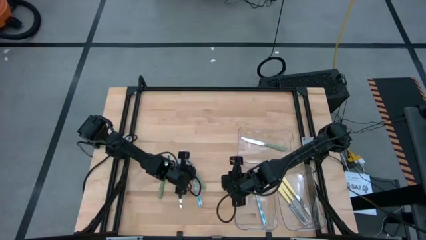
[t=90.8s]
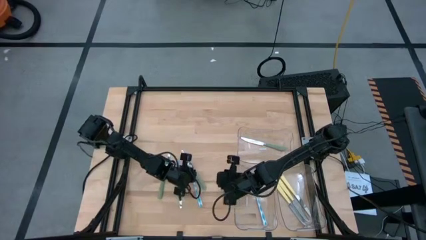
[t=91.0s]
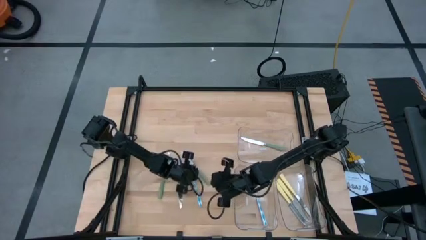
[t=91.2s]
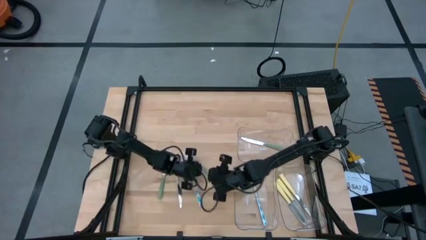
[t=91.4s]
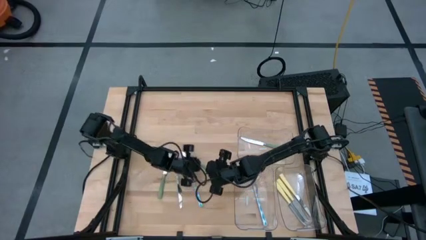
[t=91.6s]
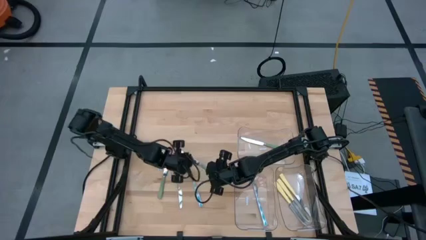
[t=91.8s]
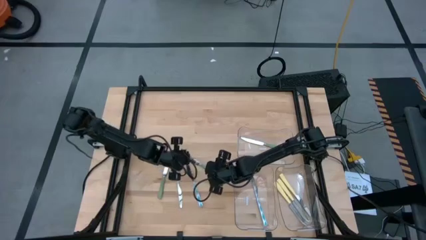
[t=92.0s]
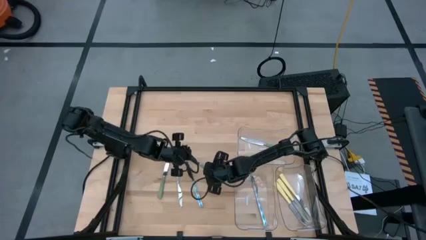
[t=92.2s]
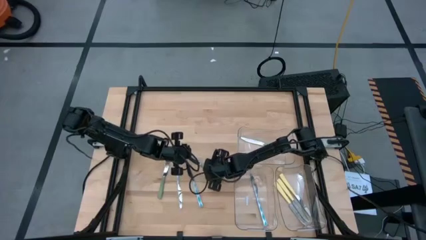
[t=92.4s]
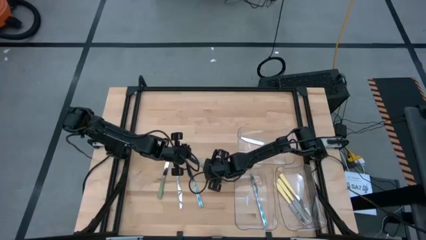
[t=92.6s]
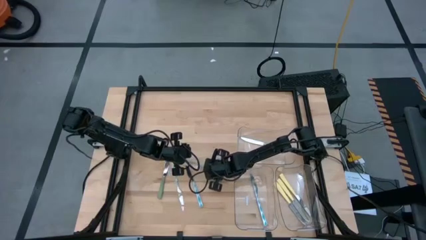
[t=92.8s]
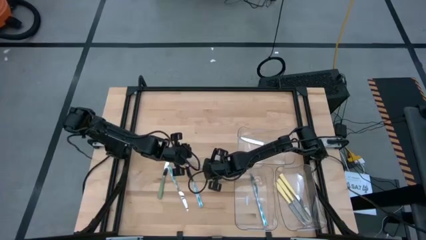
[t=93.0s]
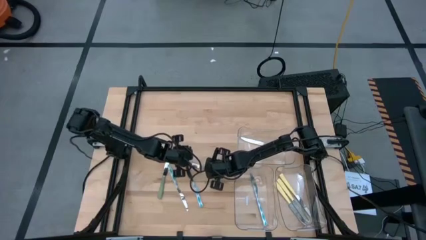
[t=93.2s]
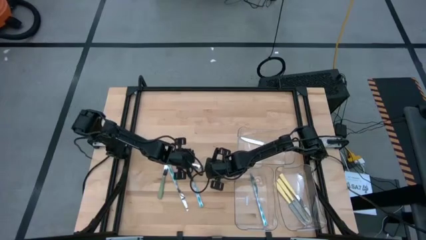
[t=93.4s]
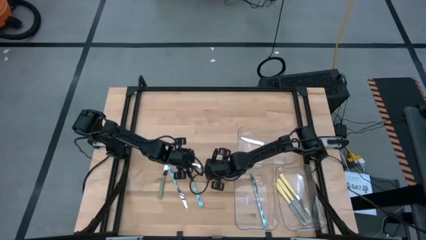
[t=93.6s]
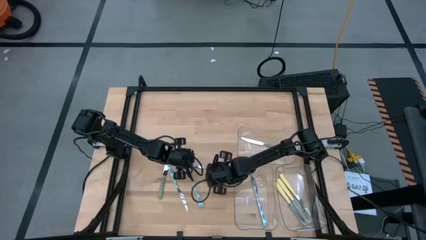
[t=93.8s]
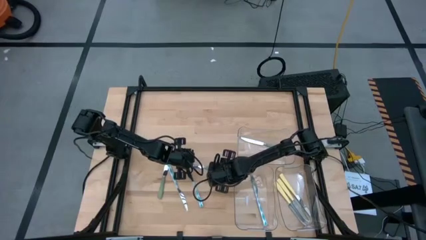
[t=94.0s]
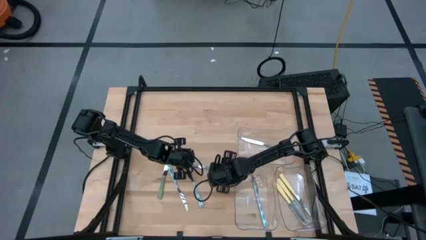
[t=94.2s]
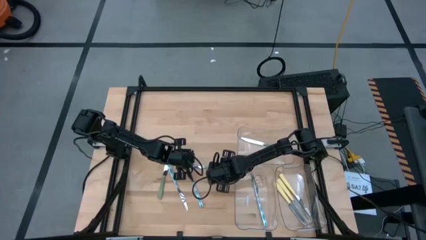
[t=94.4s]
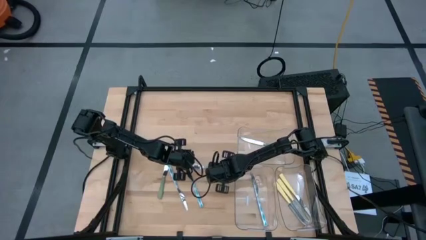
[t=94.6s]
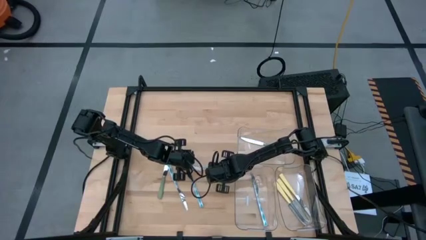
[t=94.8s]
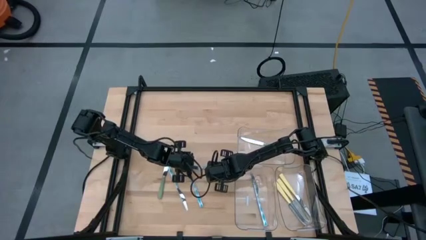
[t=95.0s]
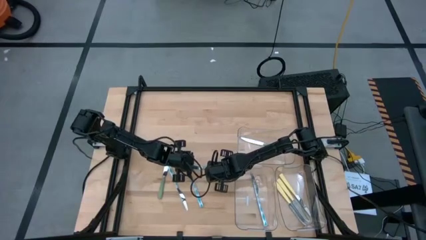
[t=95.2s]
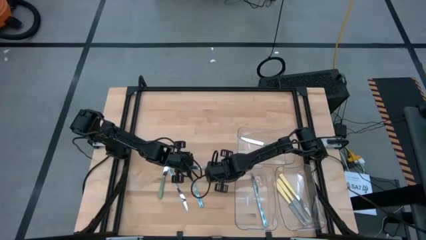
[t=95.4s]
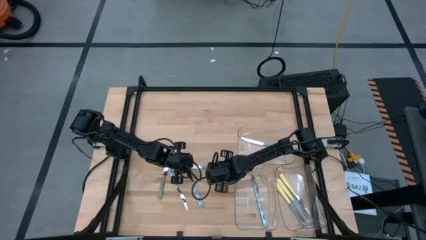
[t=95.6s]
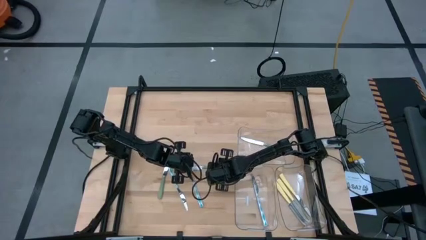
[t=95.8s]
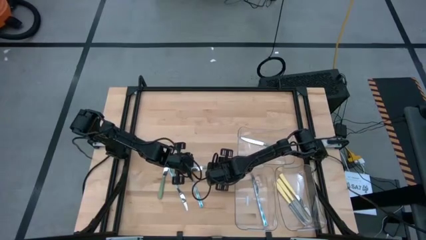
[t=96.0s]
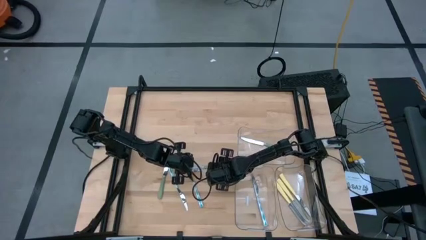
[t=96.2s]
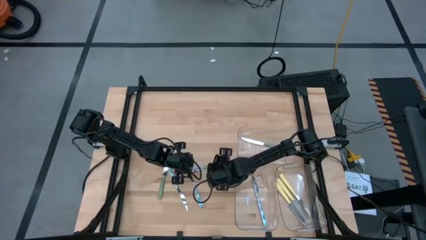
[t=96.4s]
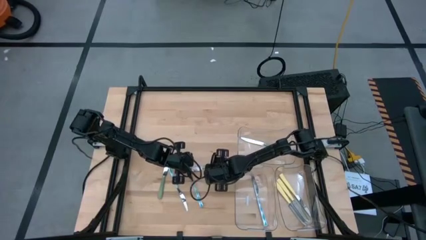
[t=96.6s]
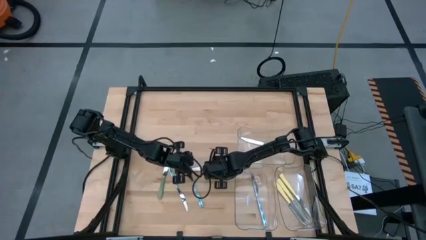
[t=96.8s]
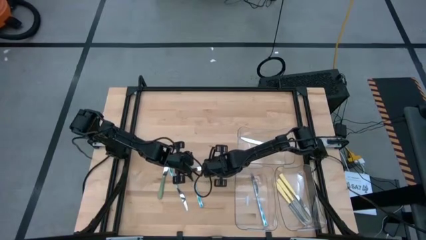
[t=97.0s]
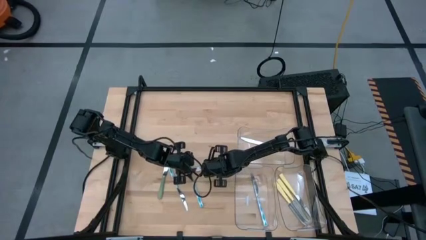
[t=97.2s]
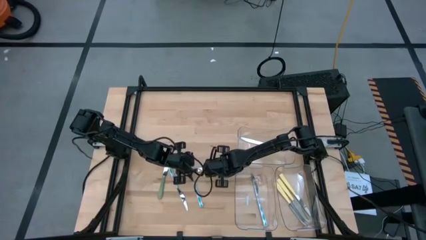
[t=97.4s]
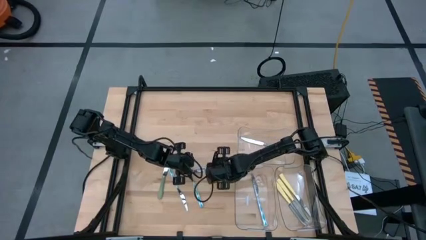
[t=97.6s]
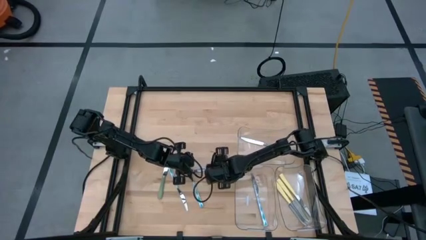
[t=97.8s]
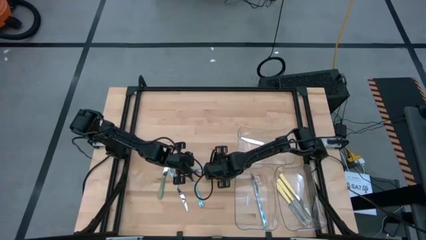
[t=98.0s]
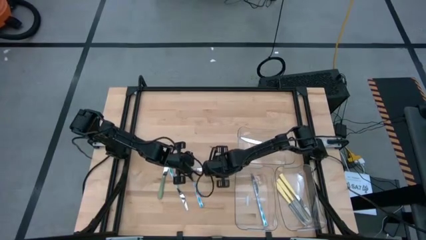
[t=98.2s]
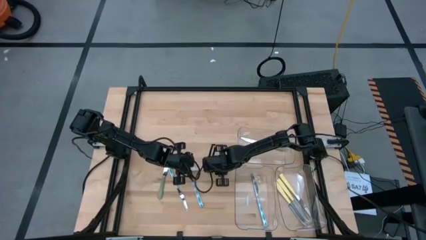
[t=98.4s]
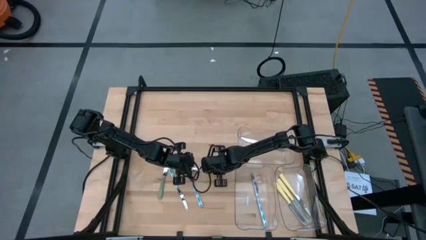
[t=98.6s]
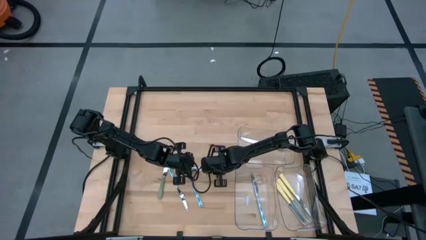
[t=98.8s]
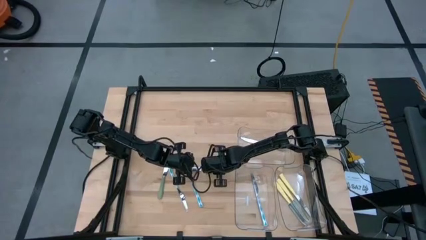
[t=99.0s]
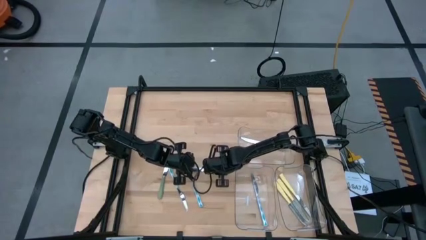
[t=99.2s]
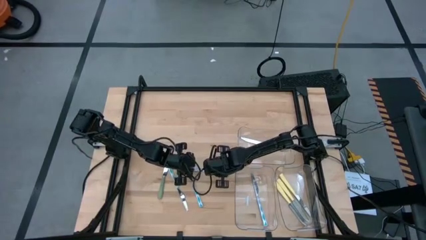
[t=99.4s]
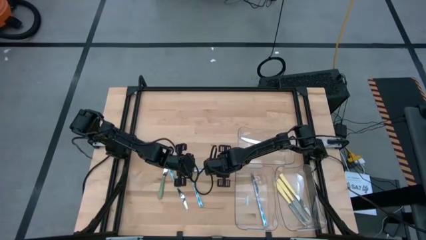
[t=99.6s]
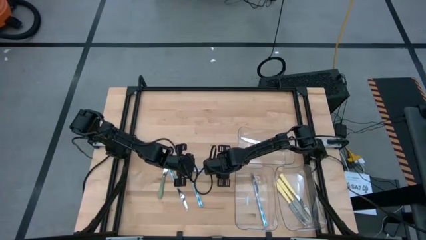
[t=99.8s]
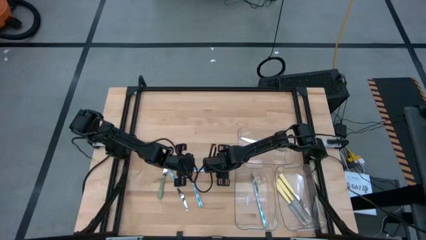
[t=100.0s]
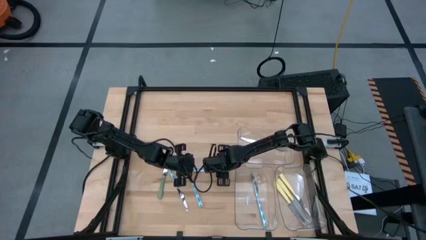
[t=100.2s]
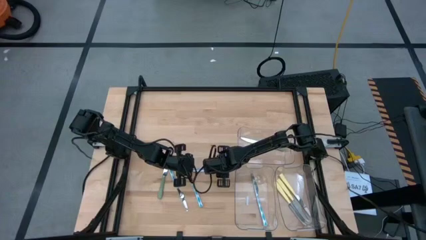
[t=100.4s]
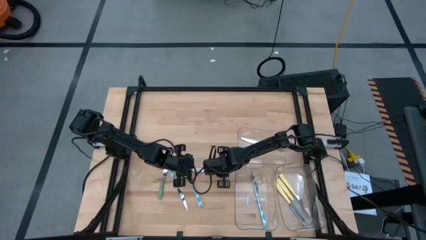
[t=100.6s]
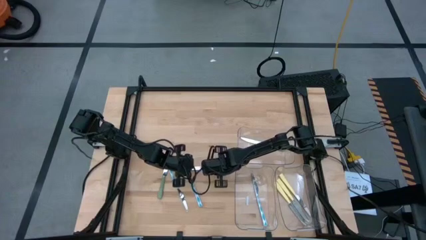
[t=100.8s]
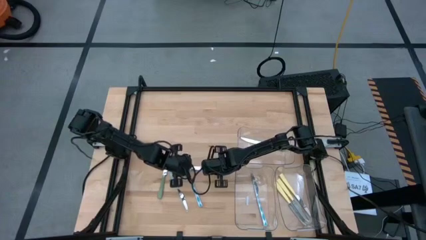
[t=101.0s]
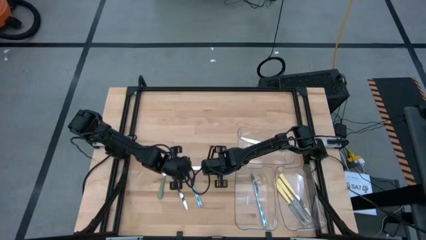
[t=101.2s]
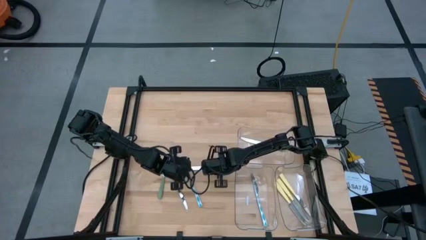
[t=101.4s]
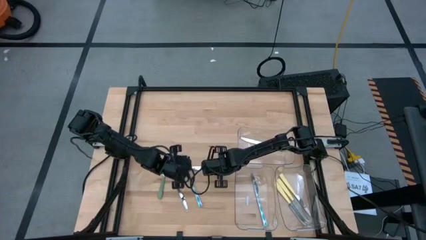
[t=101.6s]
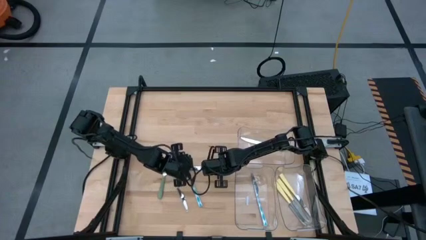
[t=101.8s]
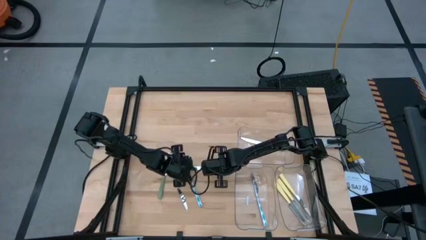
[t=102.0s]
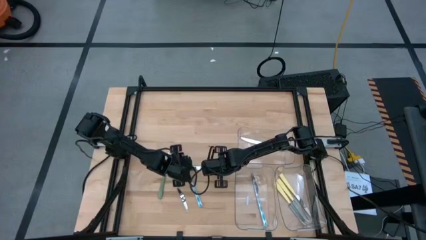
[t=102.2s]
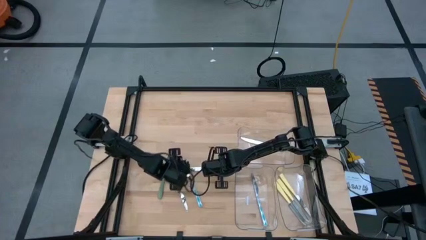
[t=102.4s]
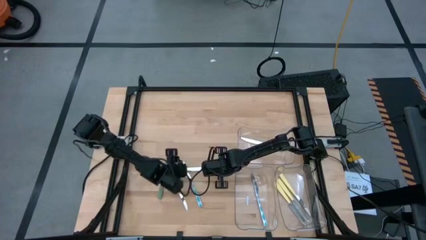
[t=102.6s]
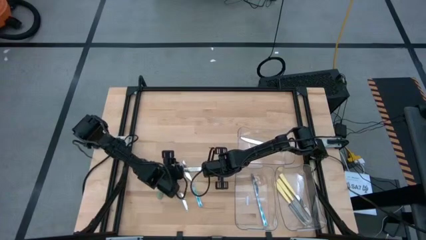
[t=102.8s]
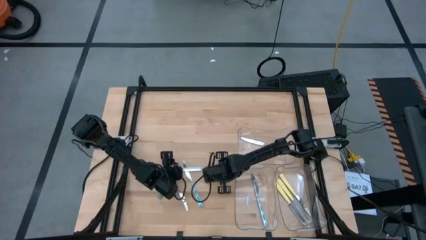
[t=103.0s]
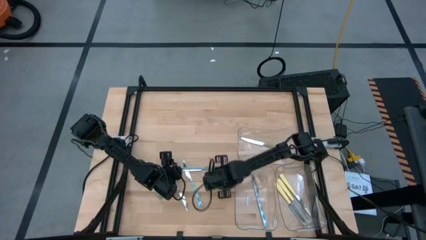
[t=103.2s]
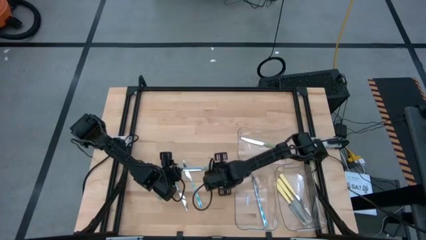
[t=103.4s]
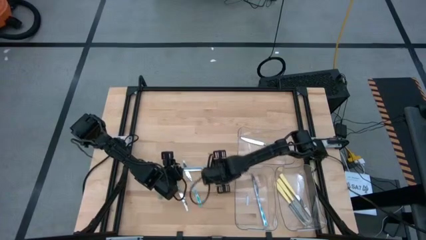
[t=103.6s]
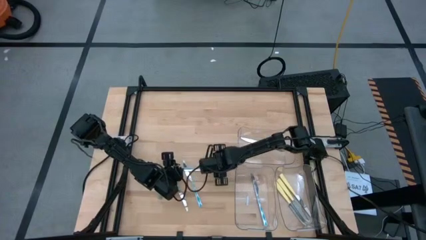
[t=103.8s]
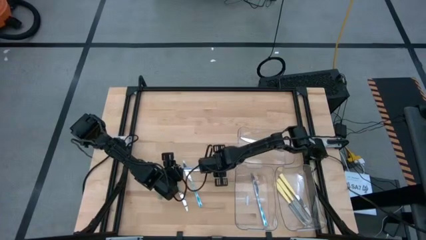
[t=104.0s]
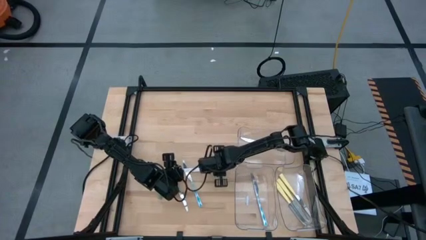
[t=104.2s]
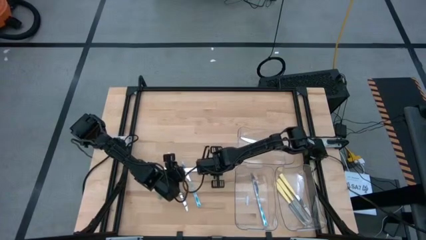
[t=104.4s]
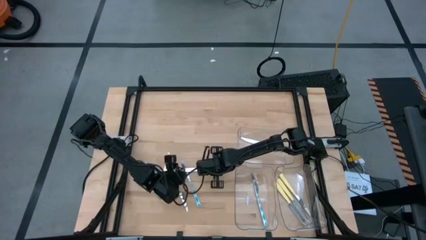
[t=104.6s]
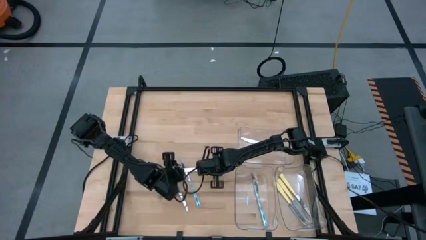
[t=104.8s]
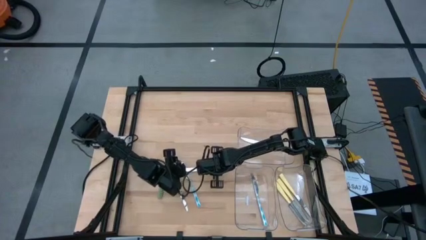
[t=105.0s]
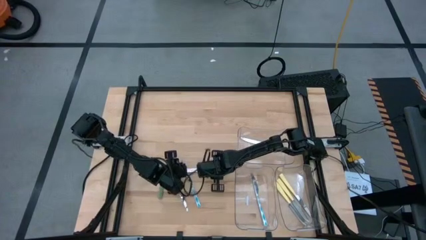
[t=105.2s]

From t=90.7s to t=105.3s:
Task: Sort silverware by color (type)
Put the green knife into the top transparent bin

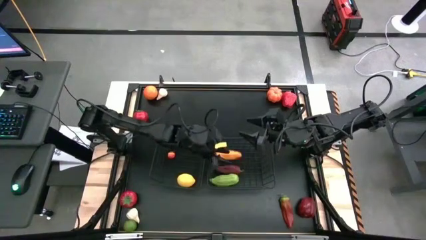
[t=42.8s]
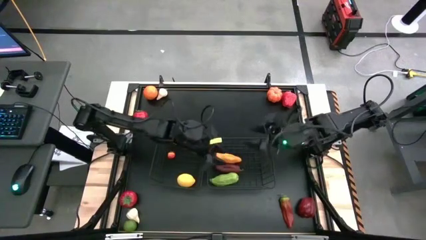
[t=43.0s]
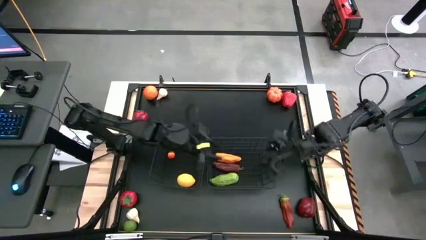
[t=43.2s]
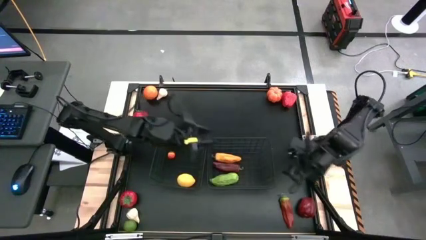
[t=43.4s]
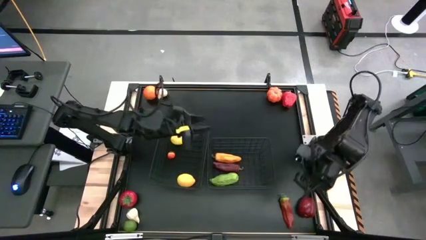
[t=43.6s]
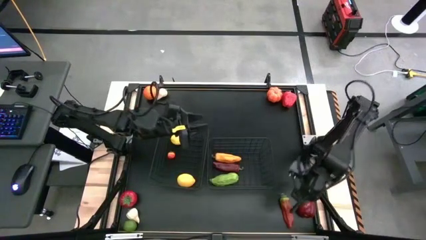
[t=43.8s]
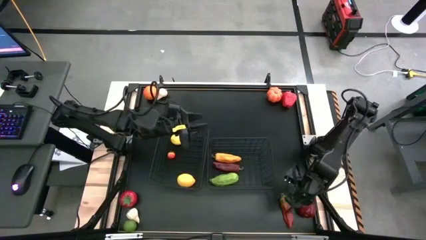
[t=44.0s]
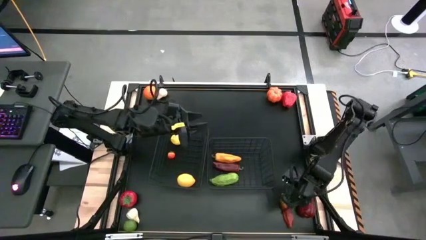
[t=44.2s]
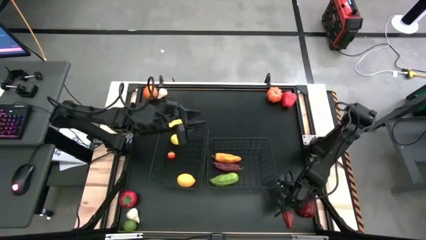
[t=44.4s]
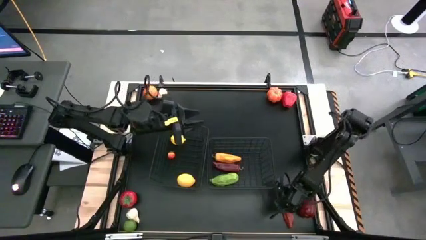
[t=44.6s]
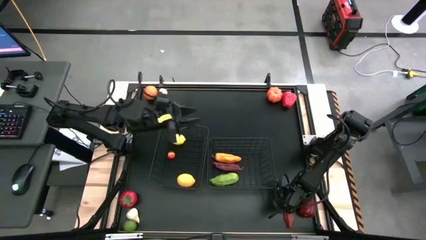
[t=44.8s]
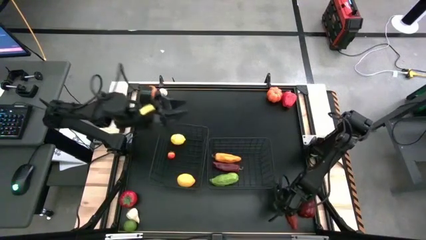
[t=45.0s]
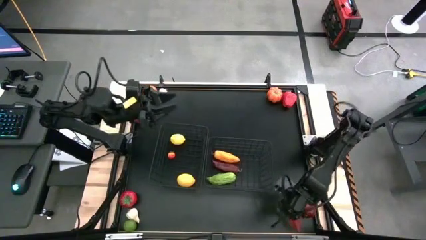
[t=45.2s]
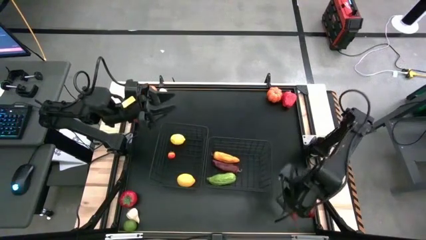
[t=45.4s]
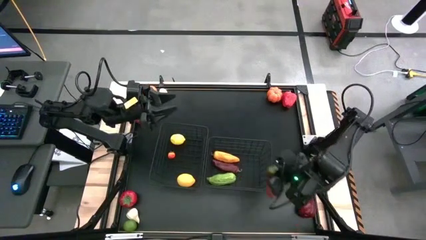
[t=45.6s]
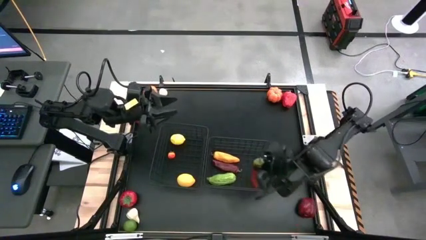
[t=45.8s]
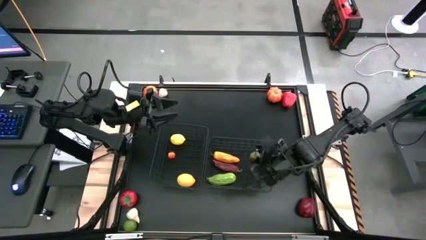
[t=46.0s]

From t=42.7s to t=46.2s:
Task: Sort produce into baskets
Put the red chili pepper into the right wire basket
